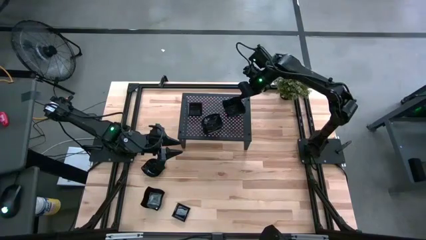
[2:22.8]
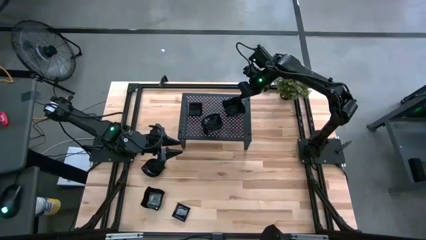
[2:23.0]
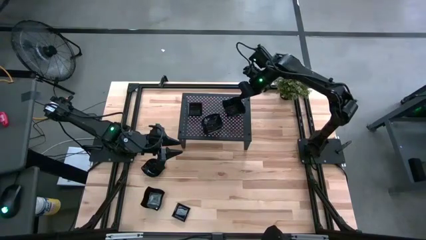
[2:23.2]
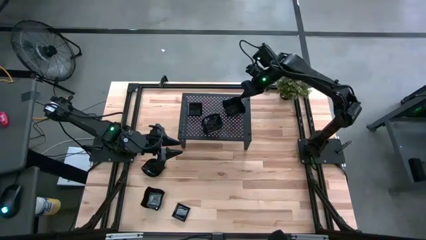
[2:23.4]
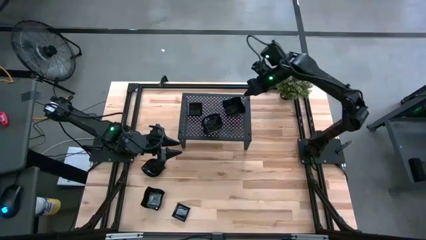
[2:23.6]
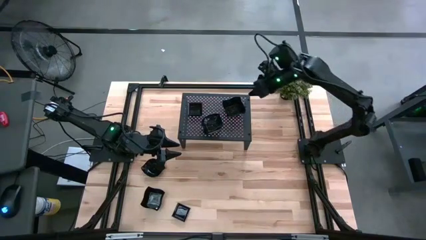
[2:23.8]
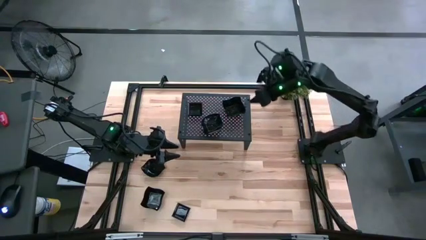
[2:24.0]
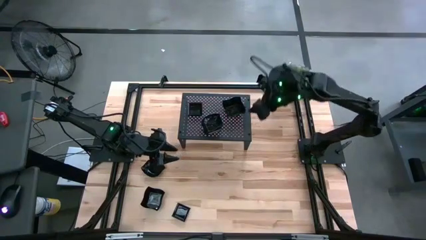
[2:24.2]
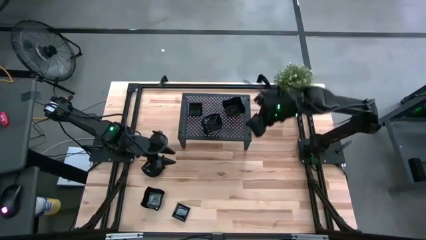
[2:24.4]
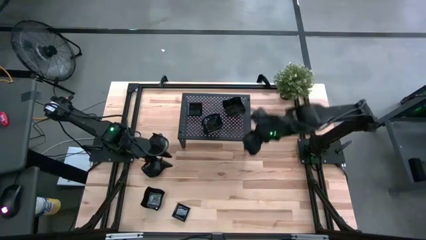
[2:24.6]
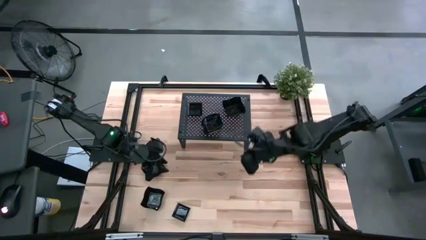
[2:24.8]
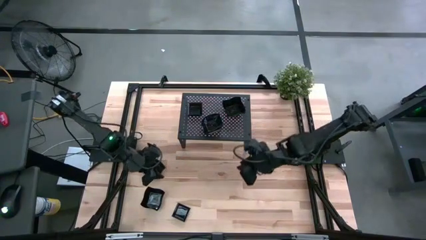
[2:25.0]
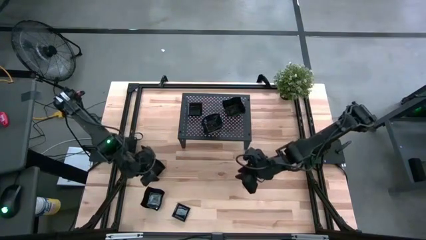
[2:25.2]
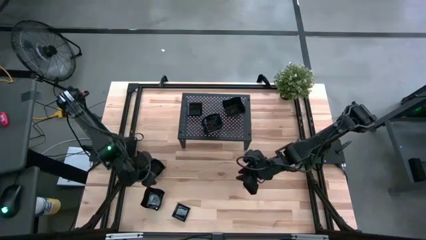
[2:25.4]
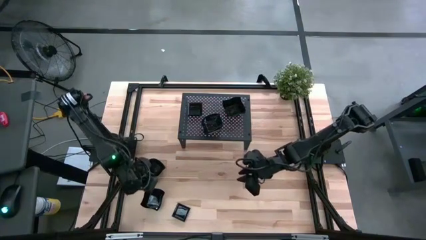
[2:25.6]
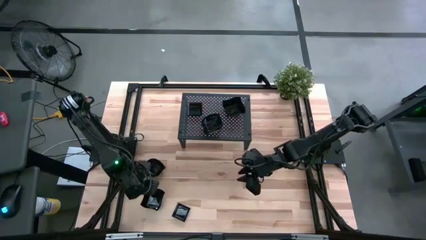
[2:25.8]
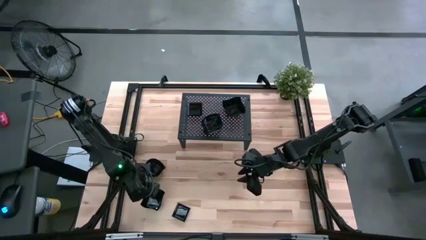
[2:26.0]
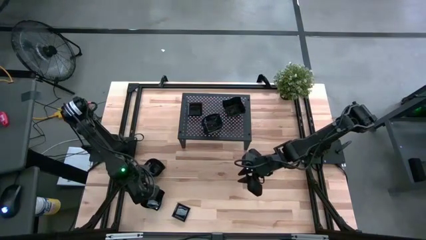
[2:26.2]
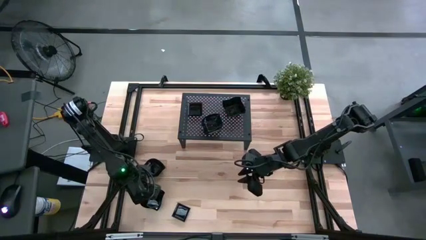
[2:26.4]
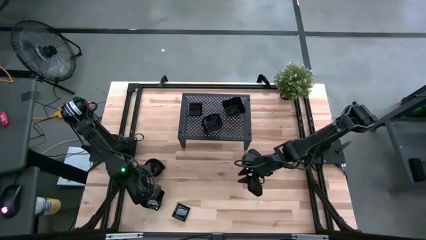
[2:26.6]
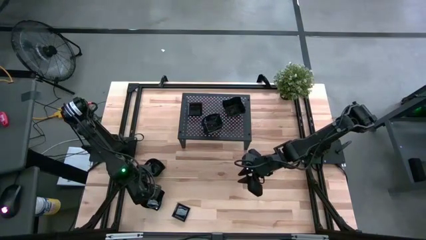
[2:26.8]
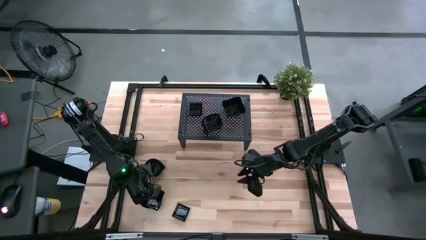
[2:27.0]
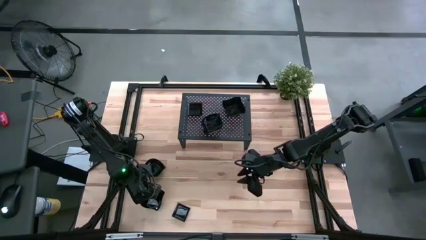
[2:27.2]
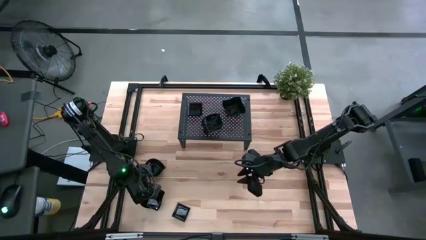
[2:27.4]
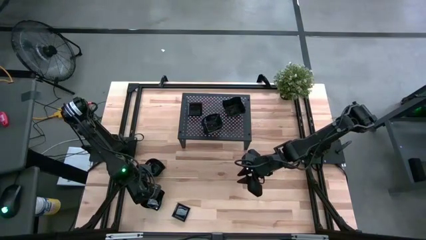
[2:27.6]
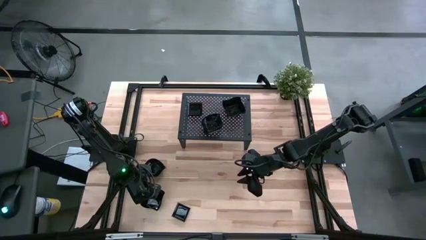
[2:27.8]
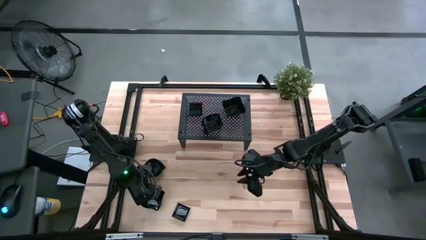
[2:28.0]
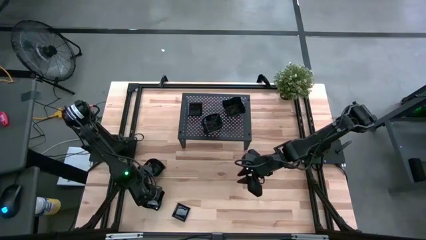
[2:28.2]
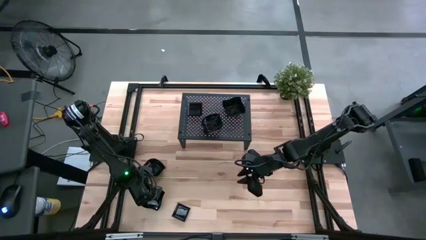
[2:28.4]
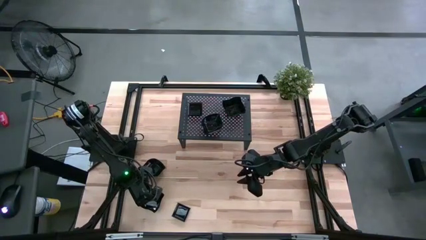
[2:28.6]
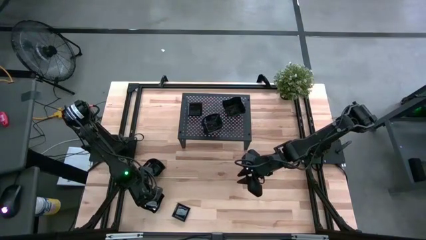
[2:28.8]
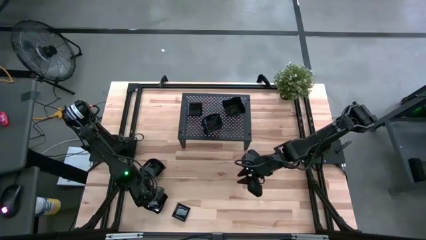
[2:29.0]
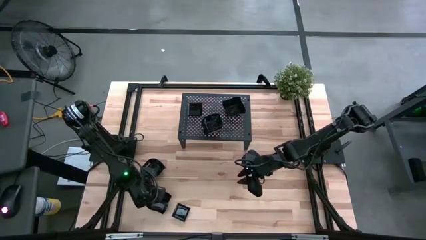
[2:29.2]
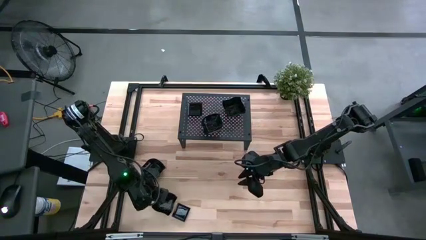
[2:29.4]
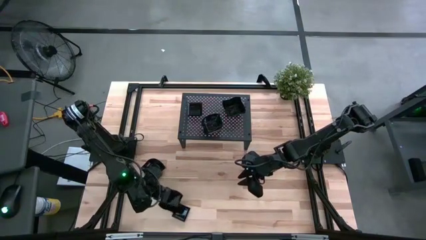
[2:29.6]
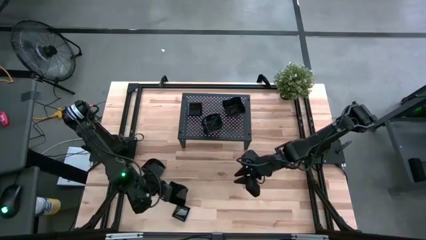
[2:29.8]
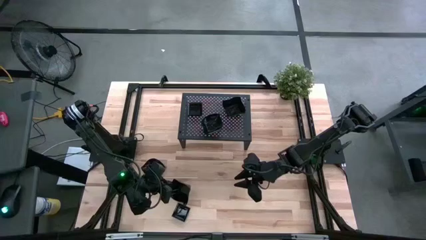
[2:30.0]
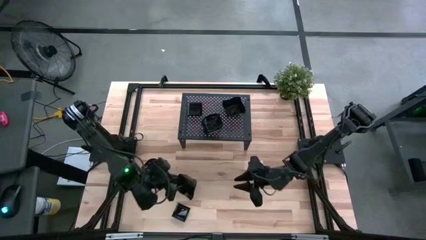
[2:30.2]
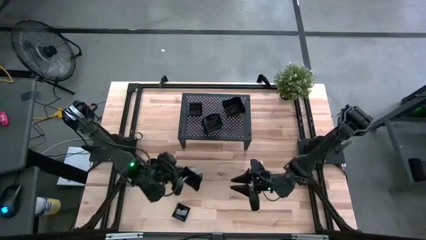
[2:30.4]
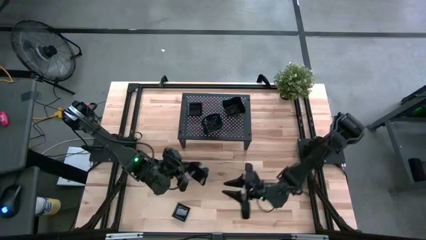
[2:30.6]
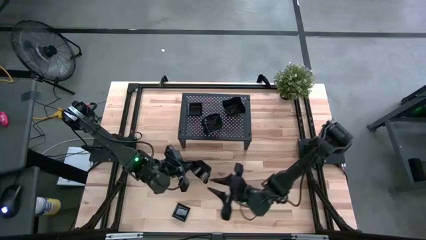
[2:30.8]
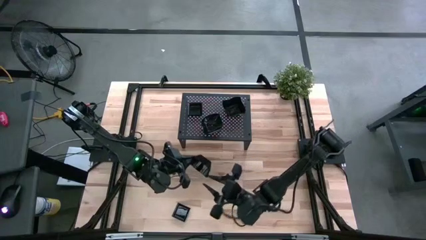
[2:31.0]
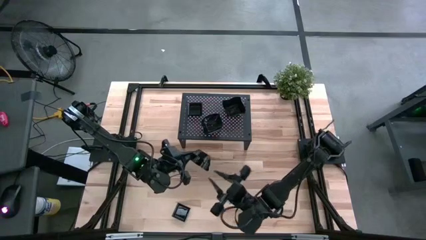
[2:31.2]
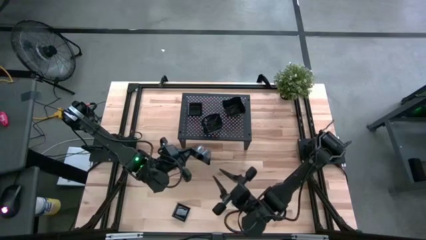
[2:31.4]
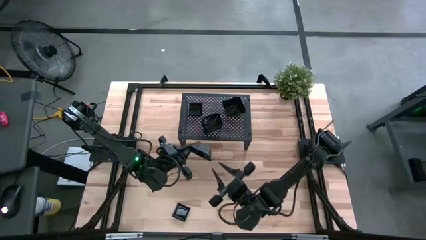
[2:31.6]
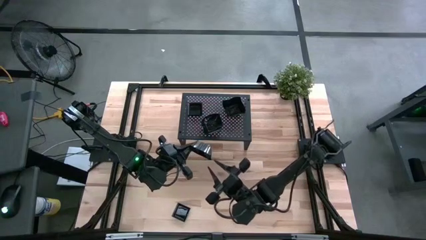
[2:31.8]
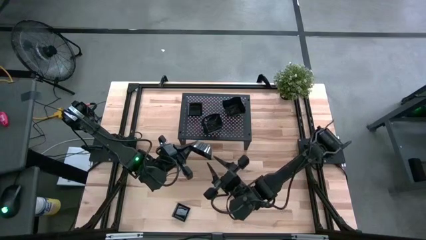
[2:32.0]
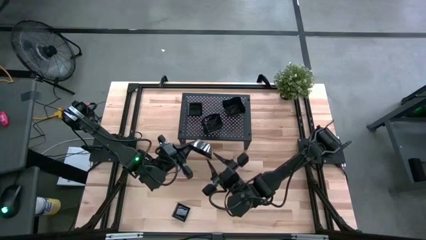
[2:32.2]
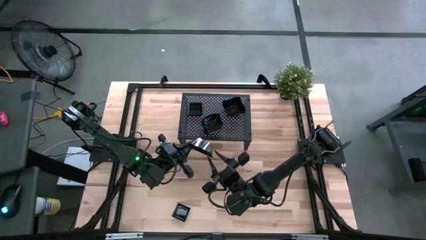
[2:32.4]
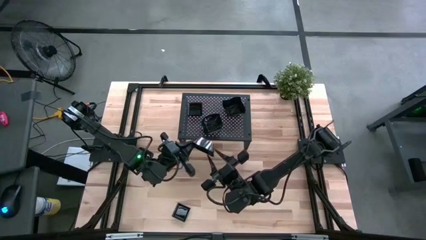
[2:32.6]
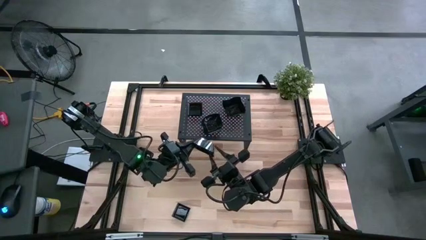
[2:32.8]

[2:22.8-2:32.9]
Task: Pick & Place Mini shaped plates
Stack the black distorted plate on top of the black distorted plates on the shelf

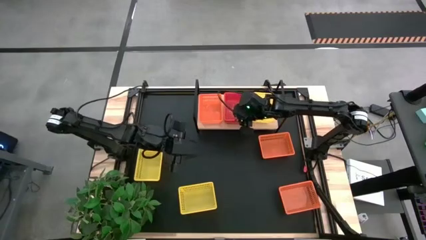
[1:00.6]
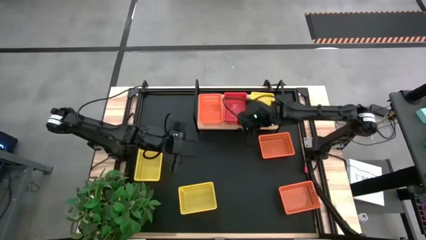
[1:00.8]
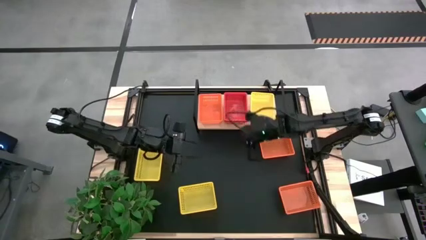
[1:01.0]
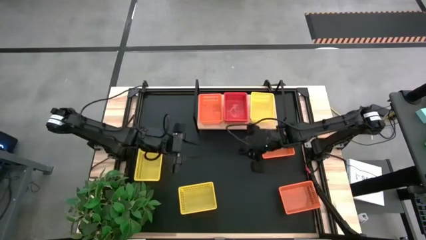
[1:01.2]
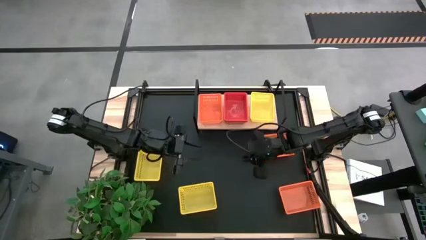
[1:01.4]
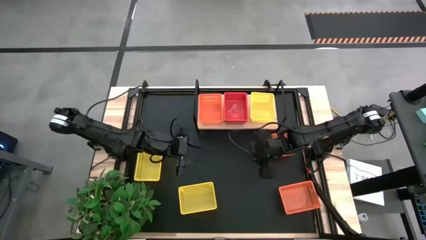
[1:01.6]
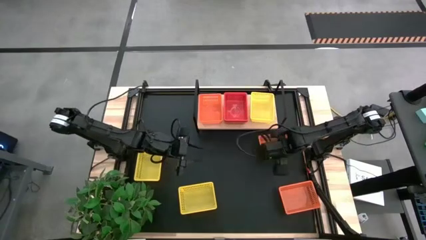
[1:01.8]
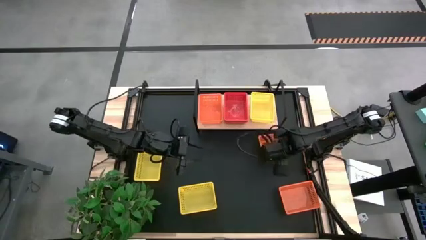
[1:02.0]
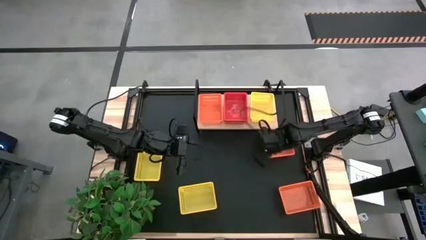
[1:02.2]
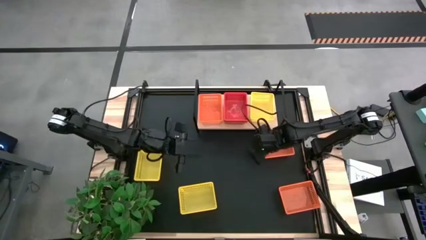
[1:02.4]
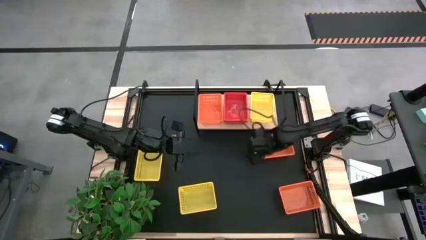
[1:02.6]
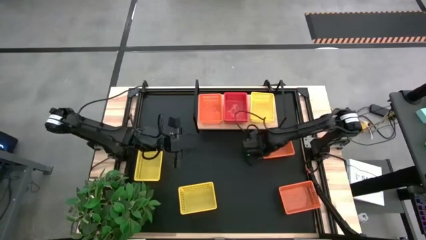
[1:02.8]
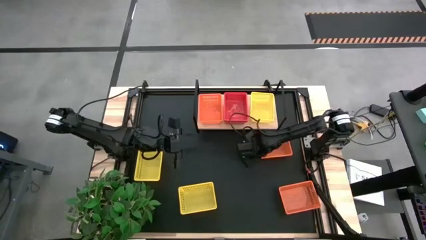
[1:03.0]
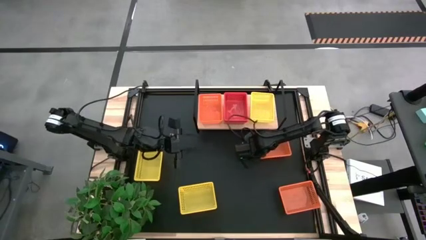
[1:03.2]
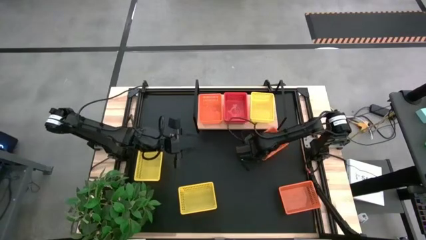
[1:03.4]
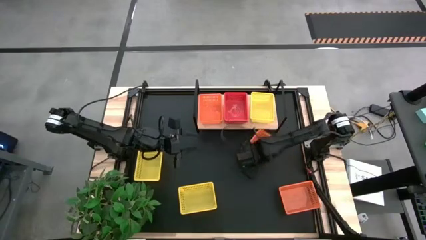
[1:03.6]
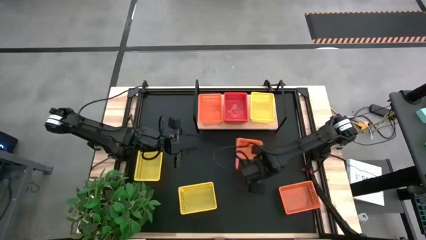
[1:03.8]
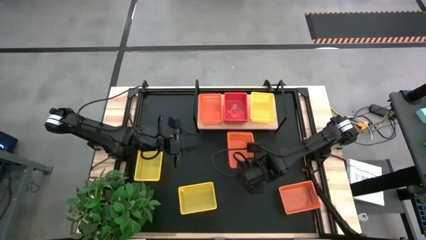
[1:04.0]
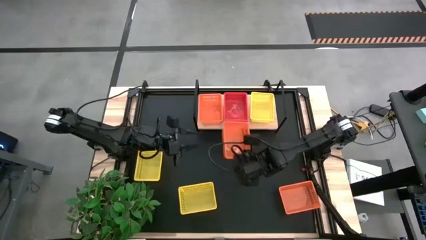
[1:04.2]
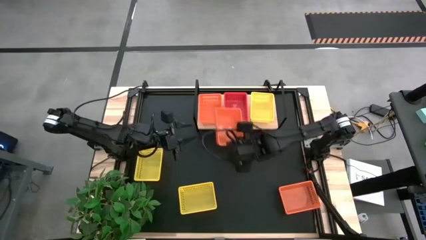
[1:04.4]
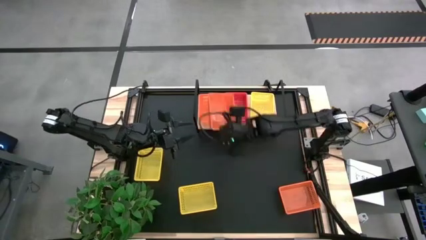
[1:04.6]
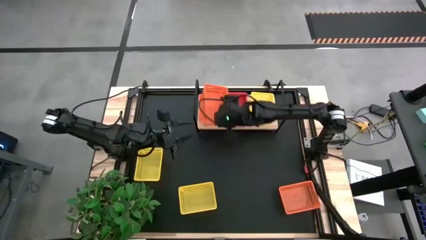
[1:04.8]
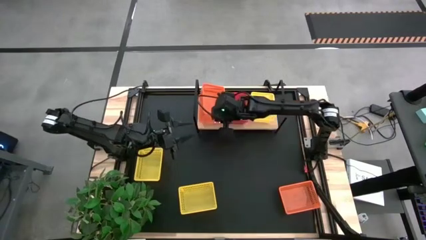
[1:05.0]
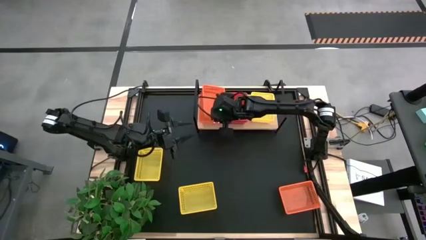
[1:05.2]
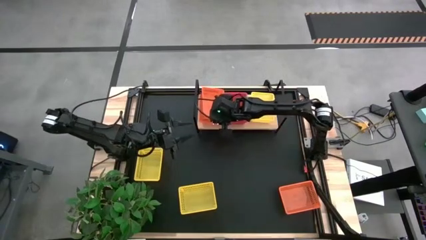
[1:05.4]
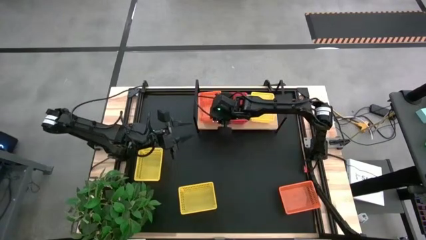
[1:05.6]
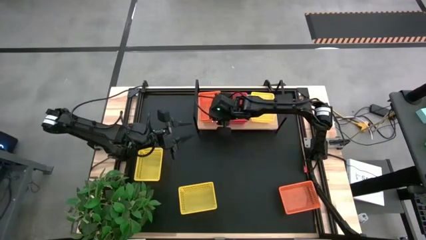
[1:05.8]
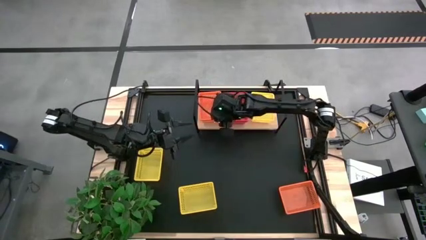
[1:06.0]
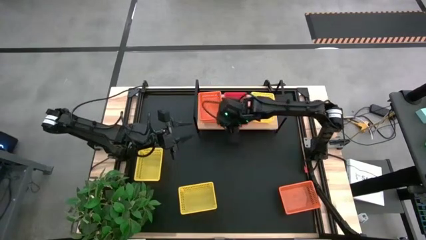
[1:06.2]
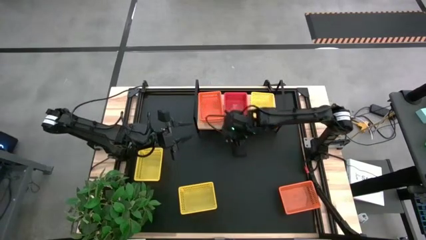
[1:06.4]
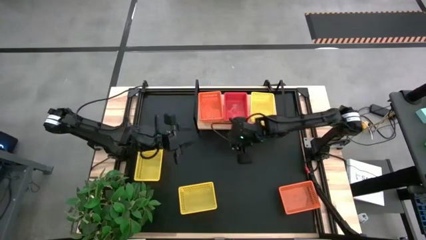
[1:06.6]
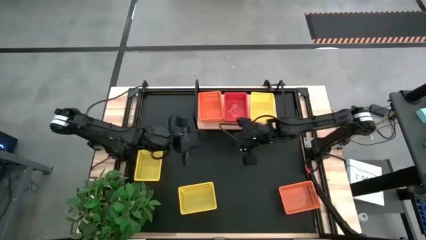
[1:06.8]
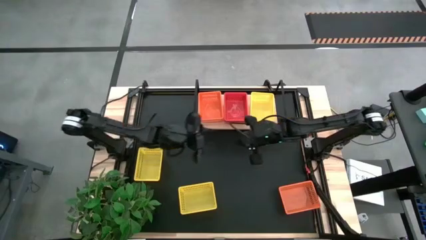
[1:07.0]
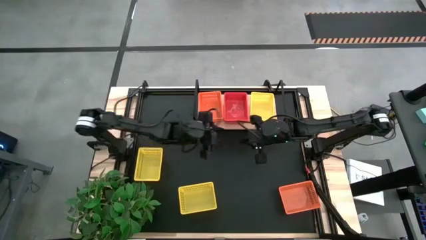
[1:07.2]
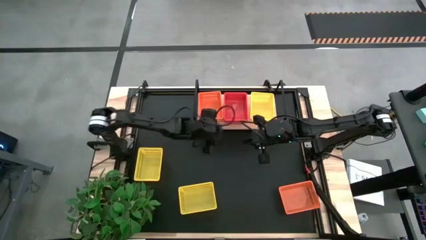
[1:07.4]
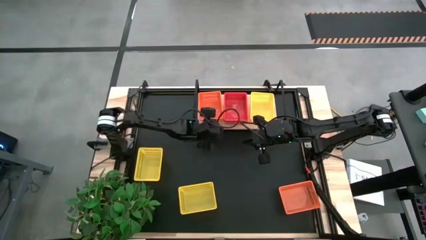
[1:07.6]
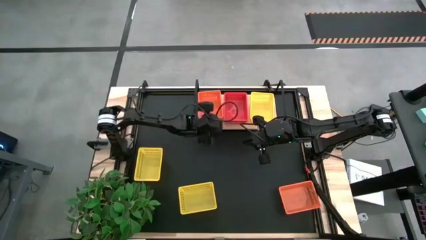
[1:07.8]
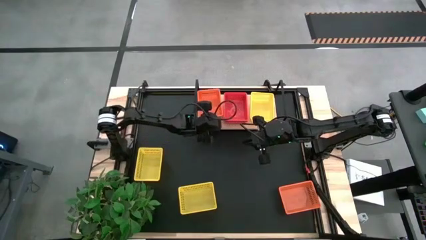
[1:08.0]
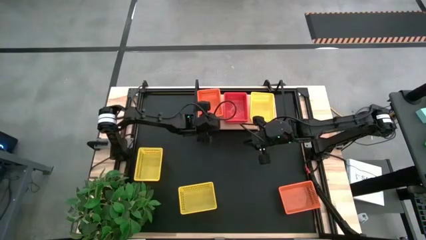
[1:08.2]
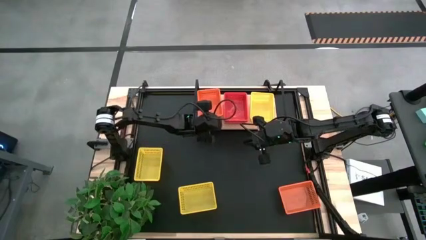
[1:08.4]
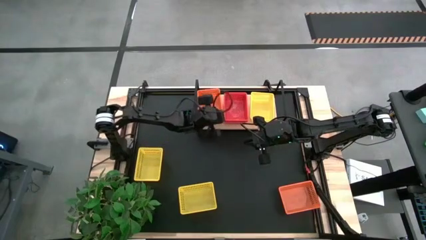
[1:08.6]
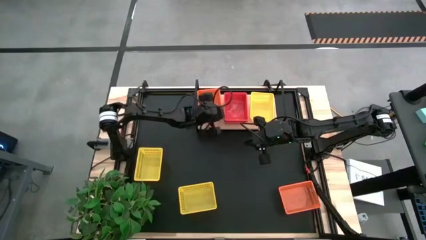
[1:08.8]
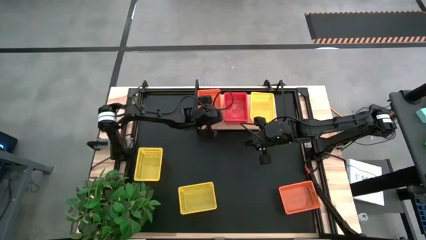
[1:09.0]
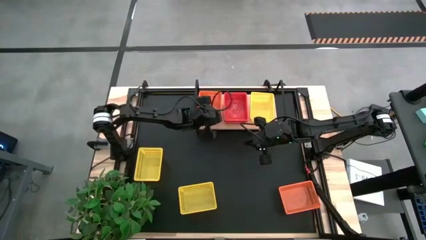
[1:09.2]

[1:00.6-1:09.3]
Task: Stack baskets on shelf by color
Stack the top orange basket on top of the orange basket on the shelf
